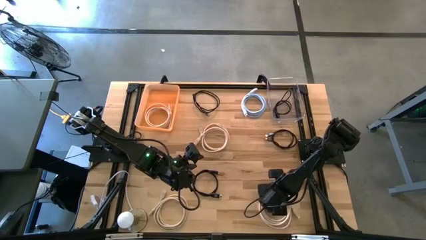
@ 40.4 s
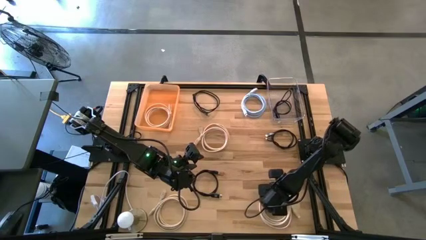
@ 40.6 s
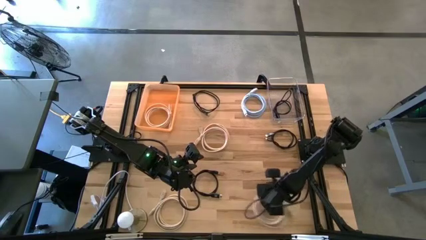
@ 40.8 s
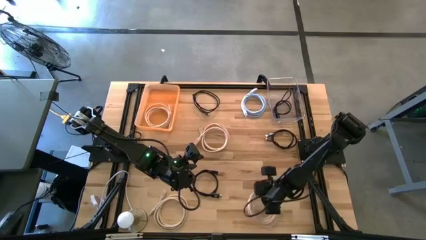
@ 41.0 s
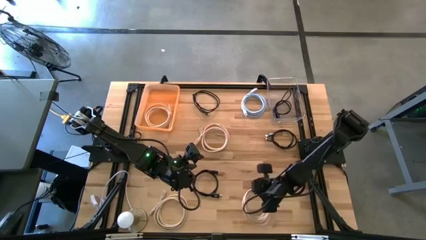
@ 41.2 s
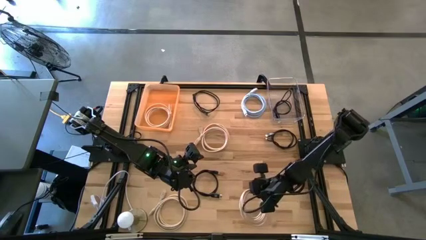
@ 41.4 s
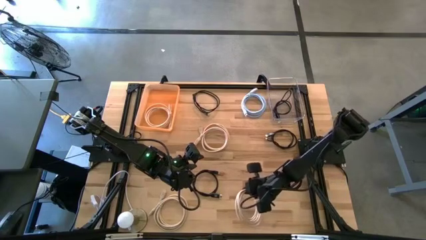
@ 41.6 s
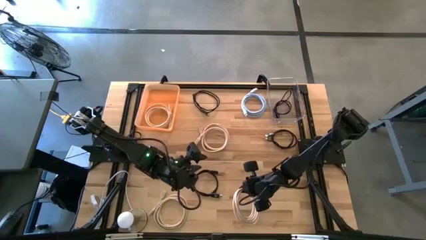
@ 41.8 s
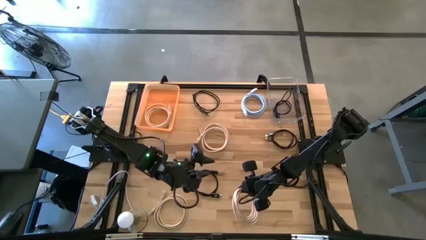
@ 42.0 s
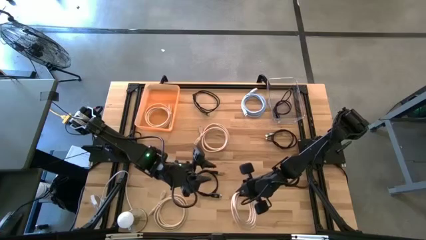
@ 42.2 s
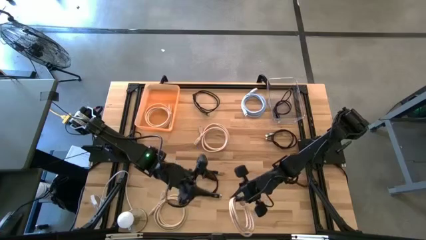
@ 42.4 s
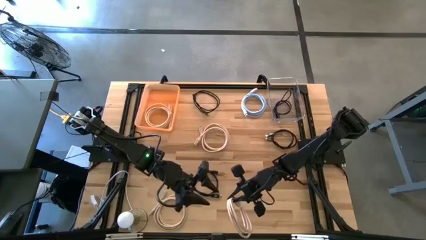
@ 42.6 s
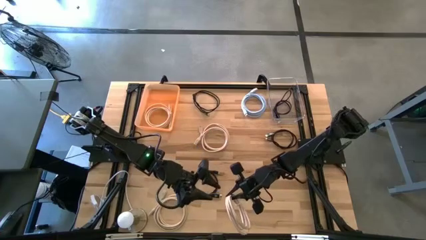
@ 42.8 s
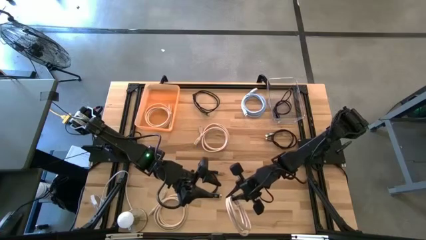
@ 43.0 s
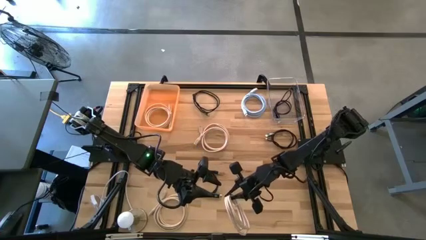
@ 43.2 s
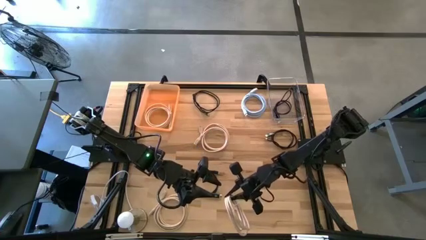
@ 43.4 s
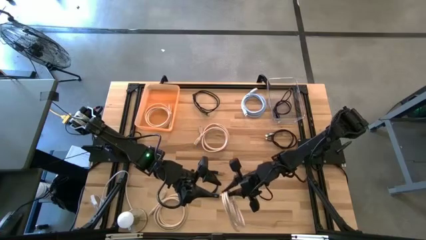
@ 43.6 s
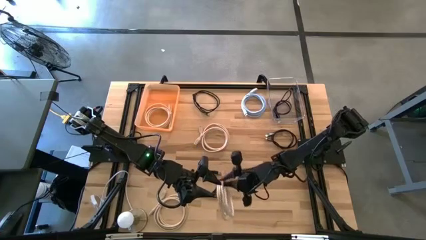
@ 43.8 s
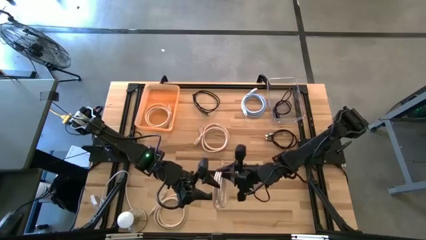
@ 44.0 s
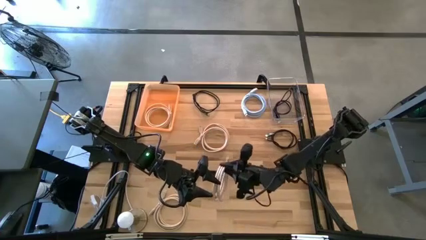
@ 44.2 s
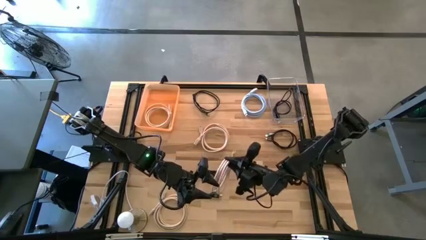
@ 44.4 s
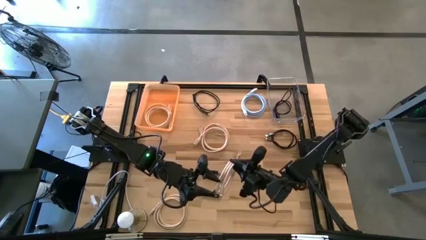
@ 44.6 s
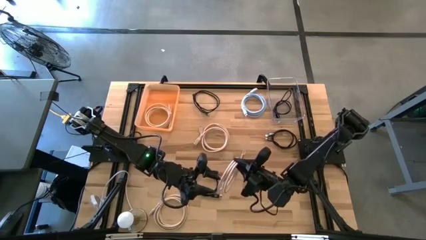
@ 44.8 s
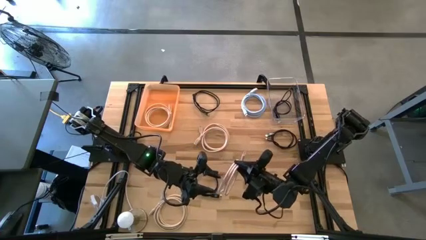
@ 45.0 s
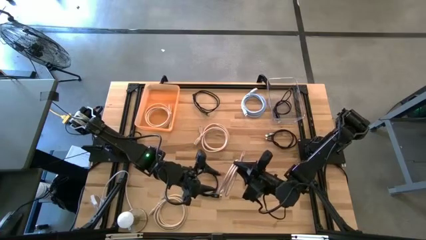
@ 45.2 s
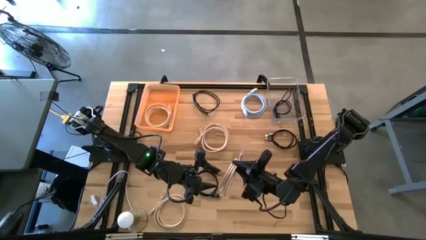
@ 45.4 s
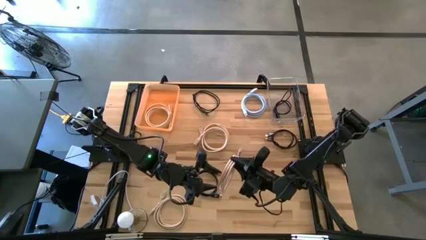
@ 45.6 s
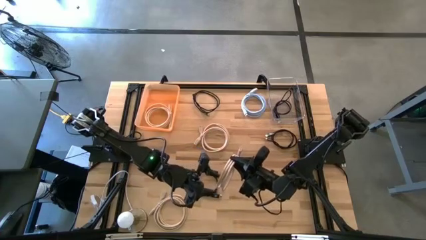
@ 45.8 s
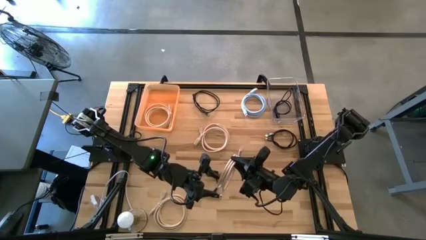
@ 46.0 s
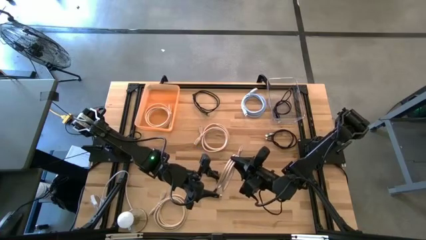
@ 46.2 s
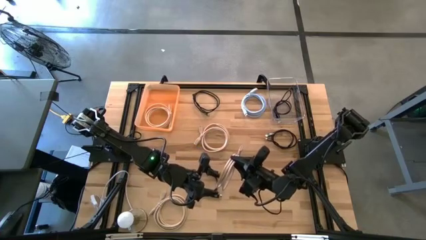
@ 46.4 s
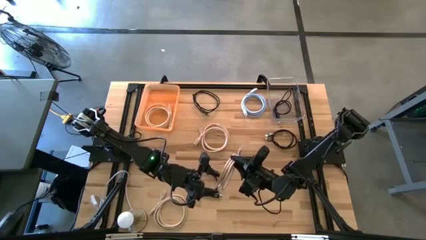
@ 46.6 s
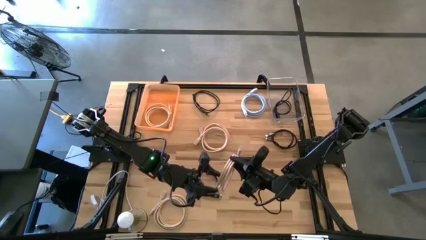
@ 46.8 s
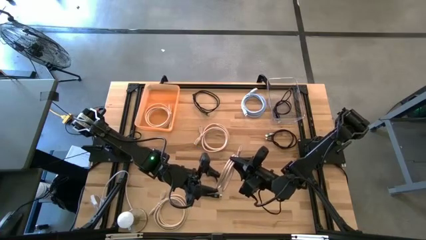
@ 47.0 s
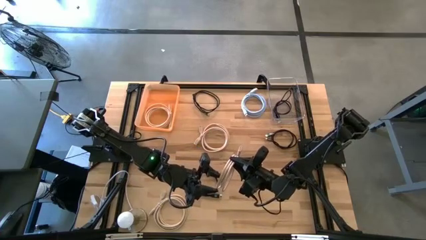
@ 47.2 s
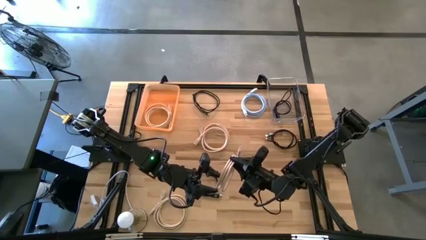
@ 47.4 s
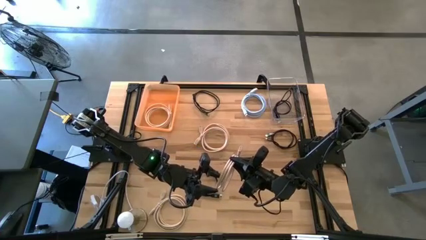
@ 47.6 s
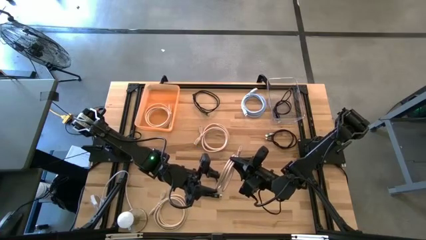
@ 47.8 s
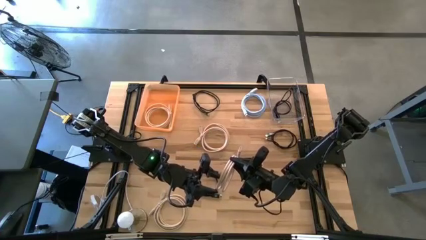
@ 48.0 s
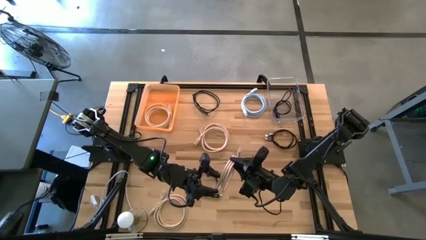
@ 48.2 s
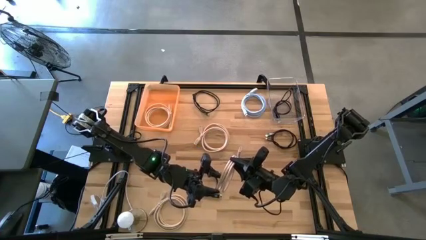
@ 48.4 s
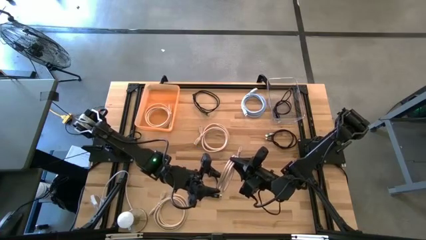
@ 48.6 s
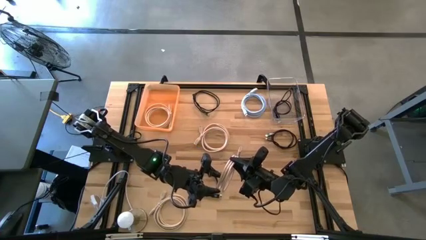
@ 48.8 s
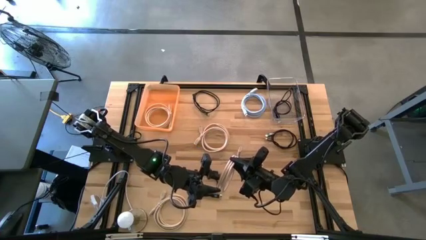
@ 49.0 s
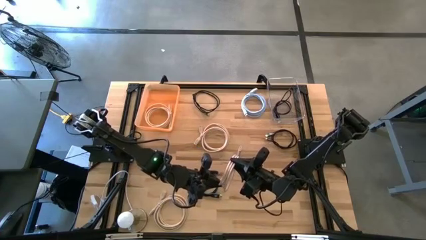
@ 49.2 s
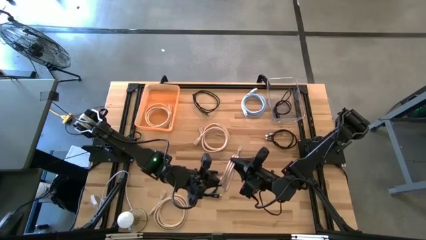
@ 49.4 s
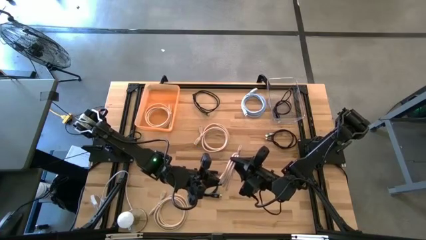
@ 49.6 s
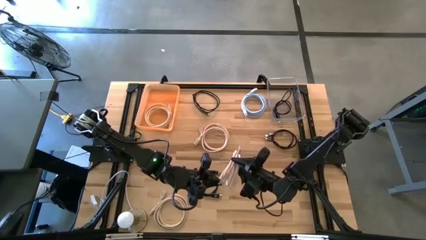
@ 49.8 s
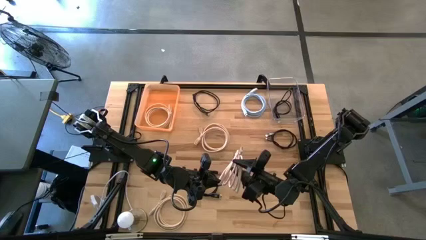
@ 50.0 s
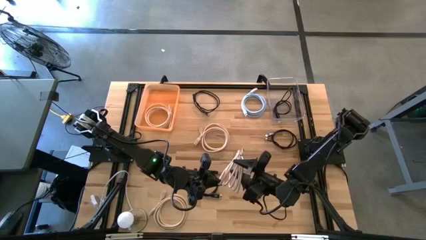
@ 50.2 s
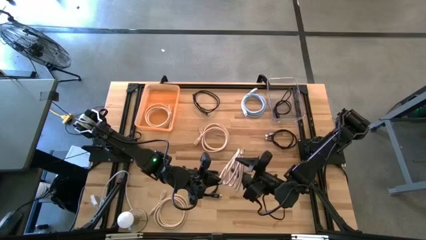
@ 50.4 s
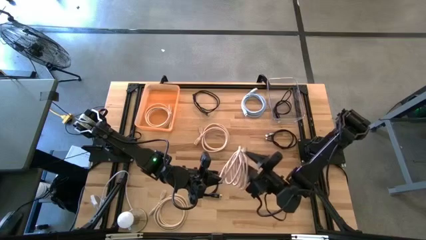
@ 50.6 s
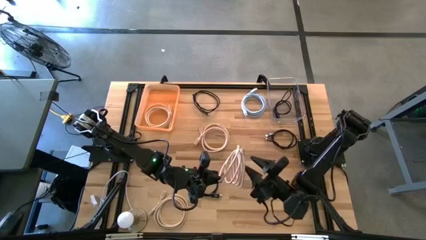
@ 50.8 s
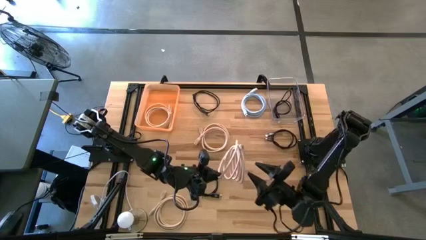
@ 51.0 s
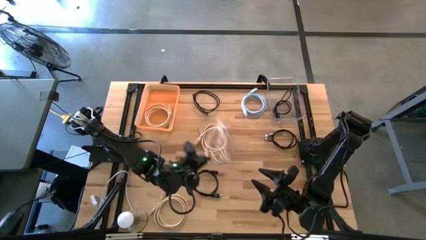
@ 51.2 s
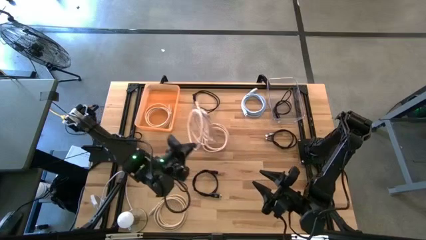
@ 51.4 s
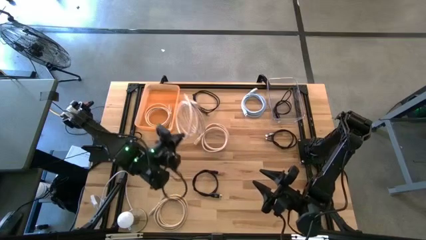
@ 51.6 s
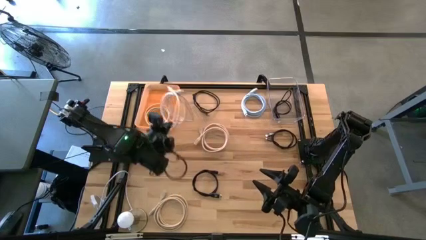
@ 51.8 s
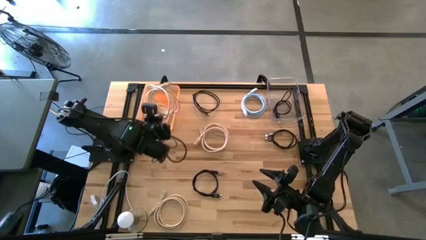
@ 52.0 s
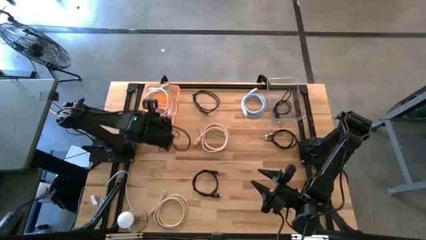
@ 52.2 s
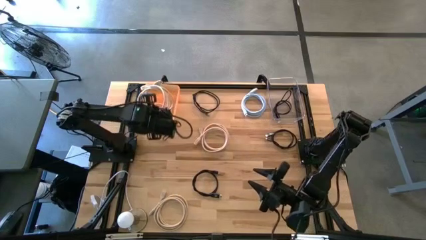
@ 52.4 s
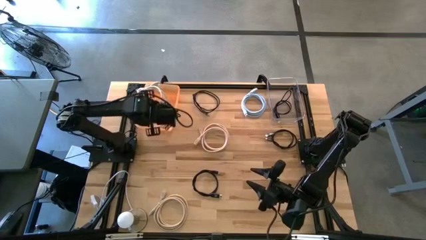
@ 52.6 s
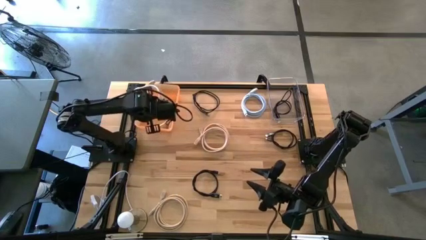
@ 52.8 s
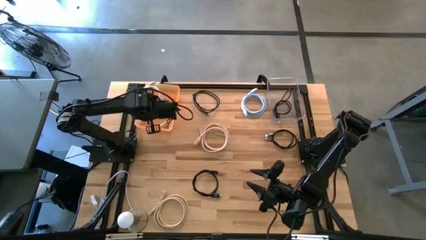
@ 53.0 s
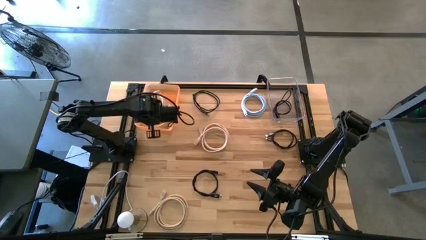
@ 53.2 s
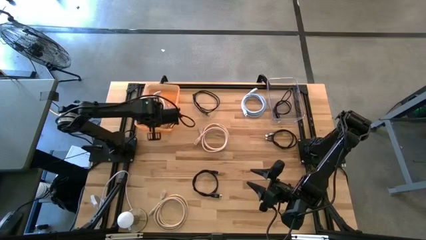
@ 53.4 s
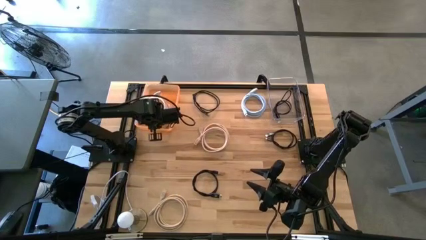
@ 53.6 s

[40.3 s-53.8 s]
Task: Sort HDMI cables
Put the brown HDMI cable into the orange bin
